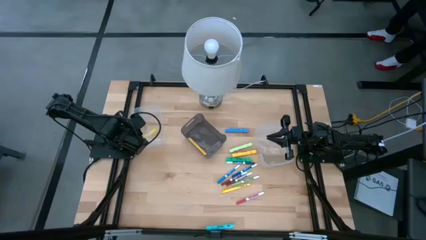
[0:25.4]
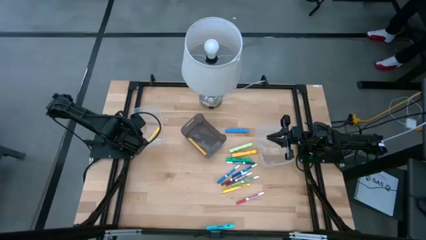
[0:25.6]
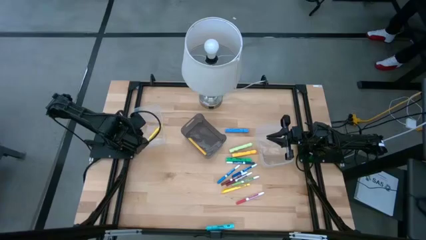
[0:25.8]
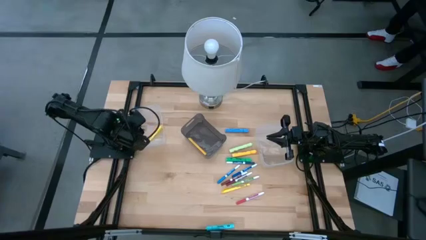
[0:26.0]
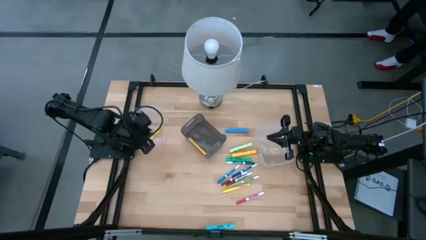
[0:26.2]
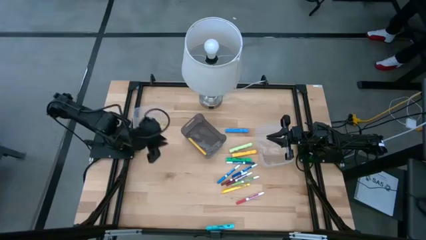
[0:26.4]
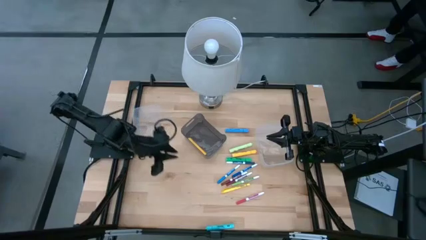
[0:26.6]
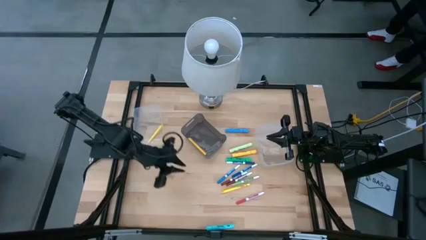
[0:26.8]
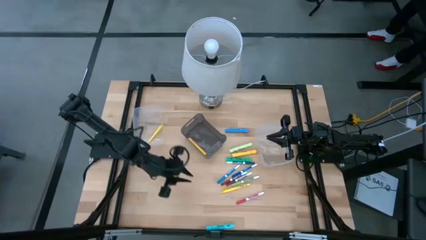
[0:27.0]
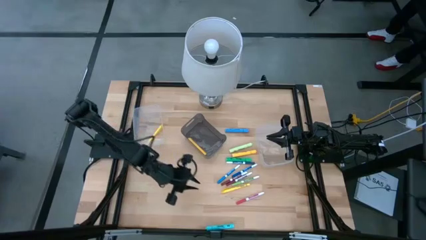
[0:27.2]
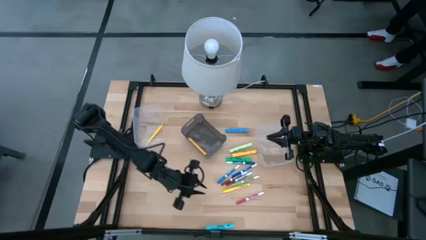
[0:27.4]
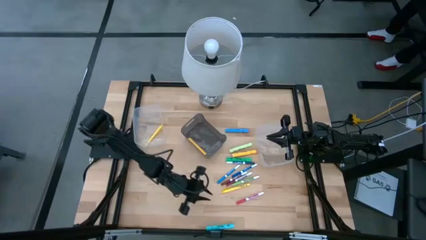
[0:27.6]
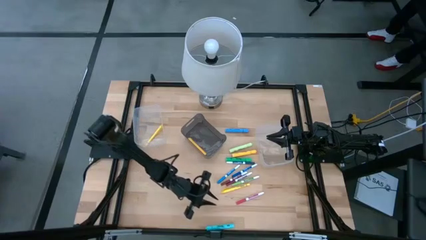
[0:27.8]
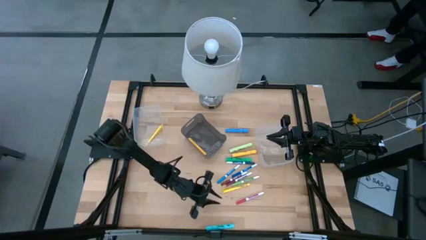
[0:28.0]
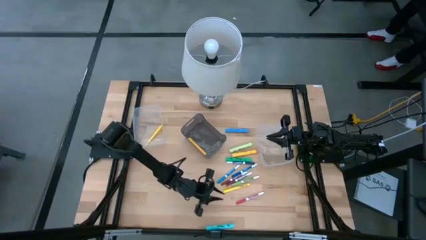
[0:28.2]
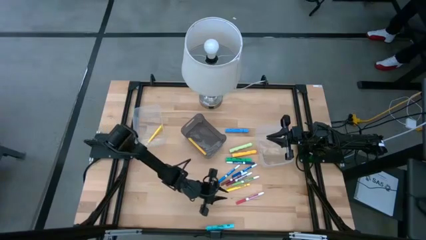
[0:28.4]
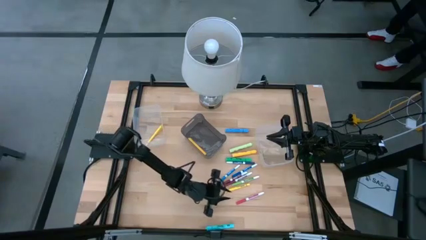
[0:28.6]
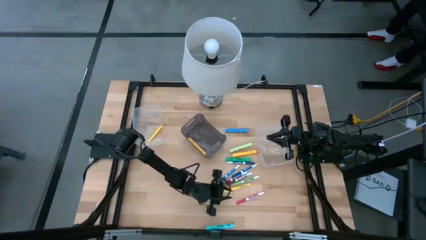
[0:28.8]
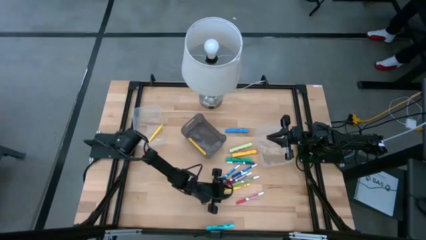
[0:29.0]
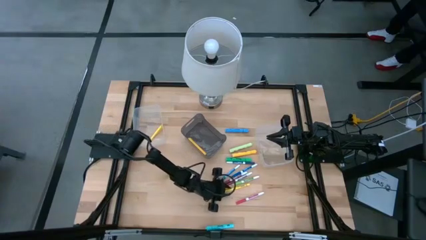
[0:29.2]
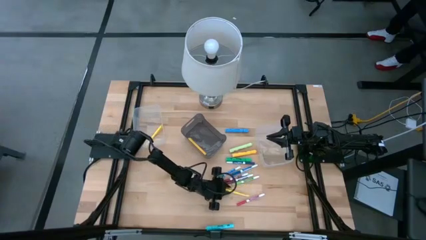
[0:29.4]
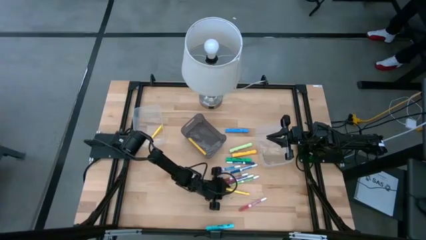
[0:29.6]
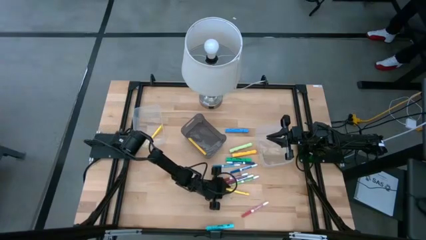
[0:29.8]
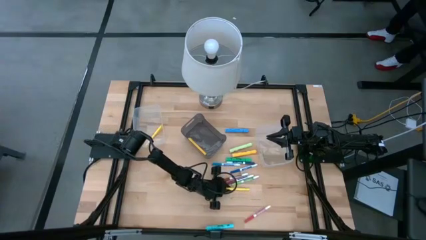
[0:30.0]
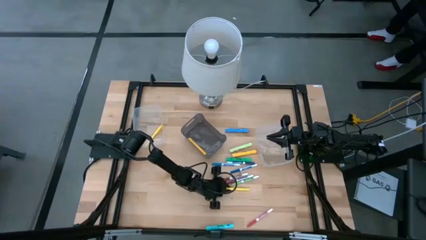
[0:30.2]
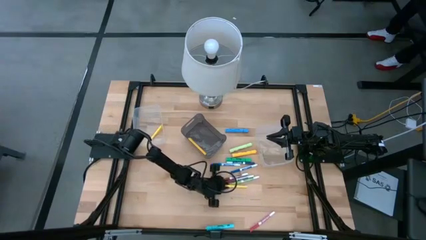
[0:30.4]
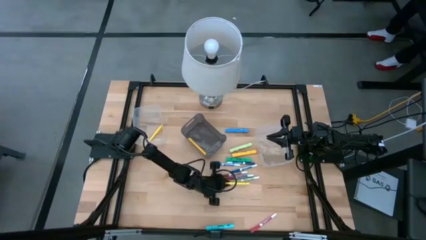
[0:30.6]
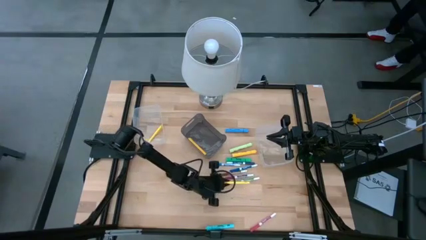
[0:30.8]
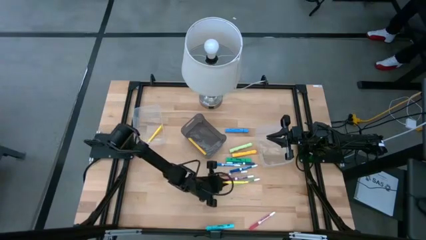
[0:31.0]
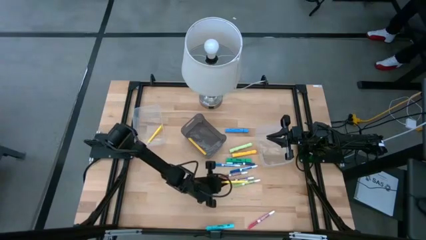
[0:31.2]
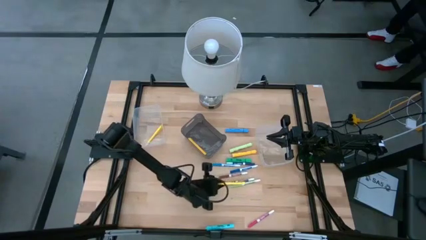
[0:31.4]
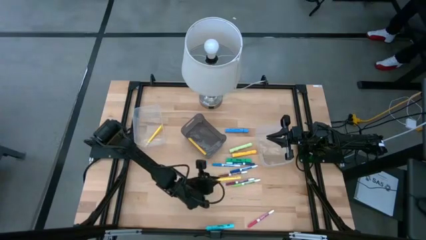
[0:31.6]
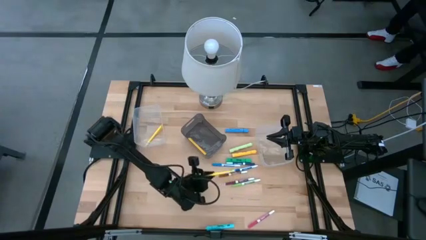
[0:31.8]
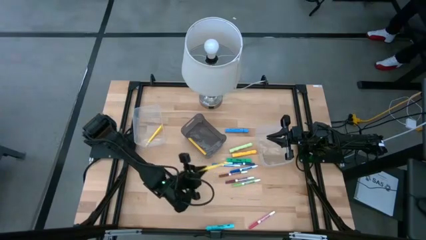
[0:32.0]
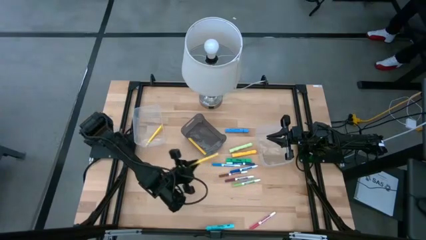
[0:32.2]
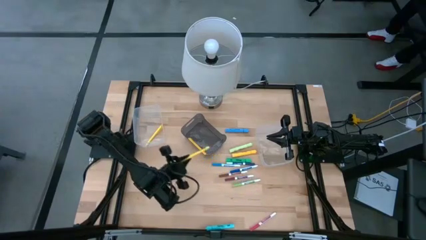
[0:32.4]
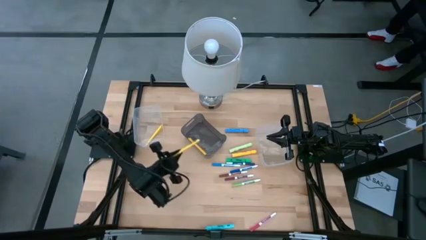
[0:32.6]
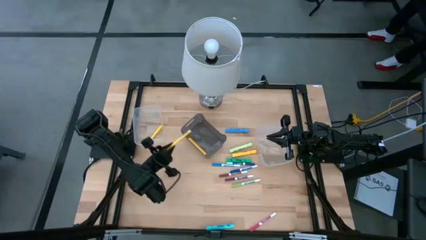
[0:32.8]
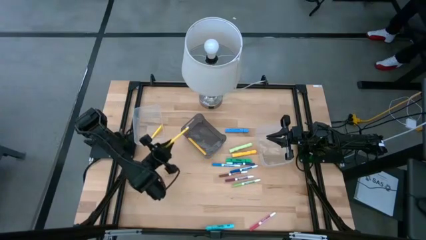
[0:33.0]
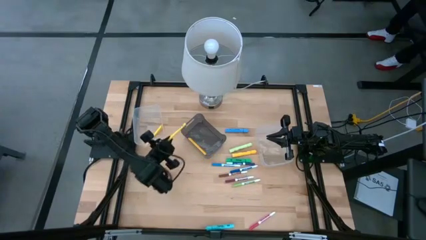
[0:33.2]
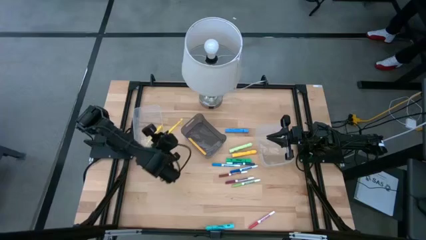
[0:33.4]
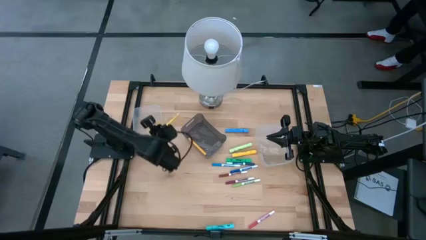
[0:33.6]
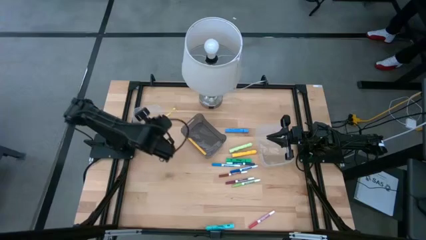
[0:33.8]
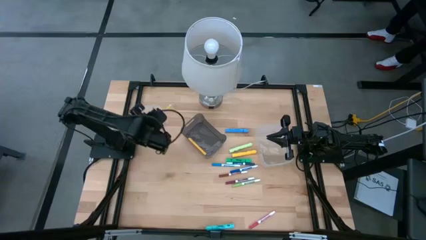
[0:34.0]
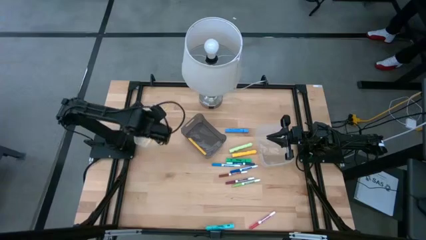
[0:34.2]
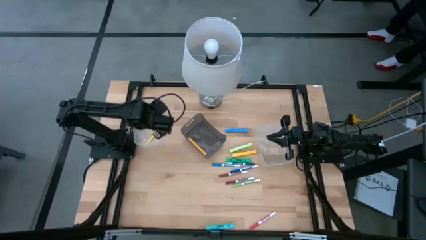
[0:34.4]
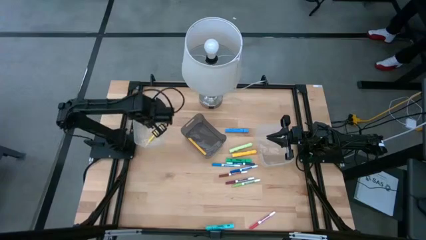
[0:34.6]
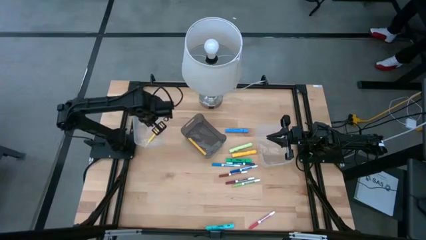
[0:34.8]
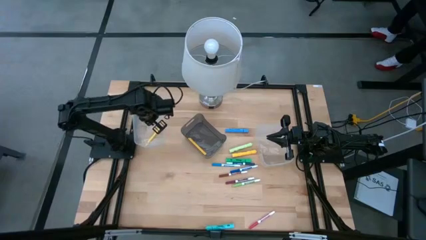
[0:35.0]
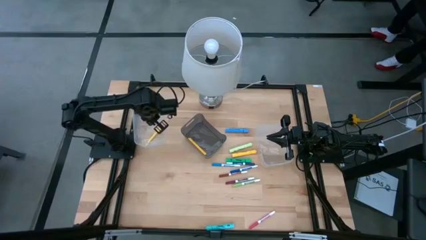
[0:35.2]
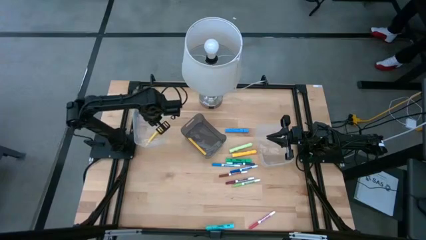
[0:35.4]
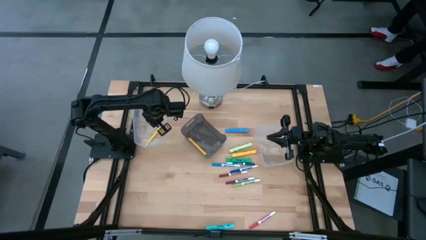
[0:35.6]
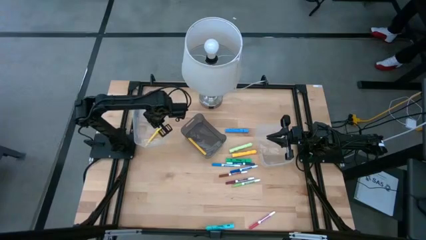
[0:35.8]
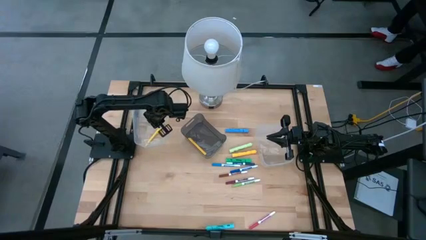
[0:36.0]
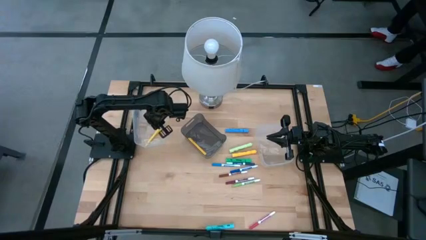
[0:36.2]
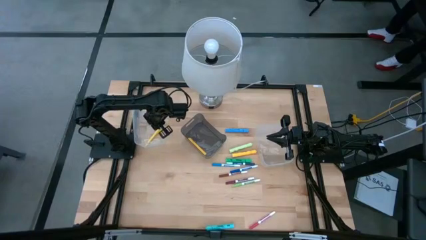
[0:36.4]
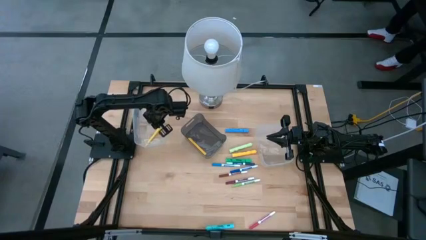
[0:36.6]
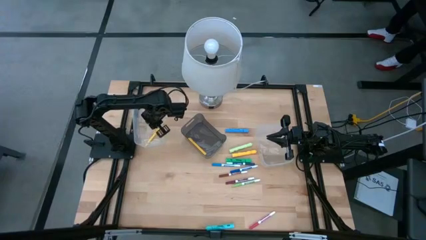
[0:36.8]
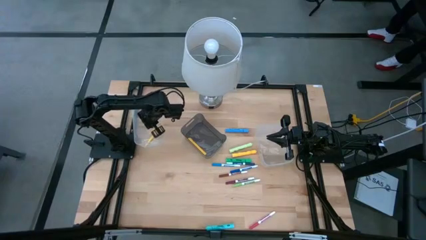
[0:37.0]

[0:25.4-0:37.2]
Task: Pick & Place Markers
Put the yellow pen into the left transparent bin
